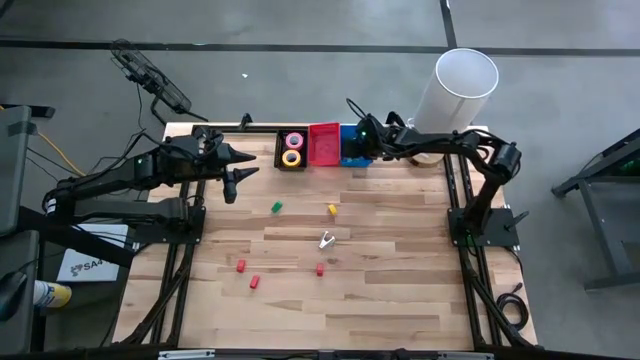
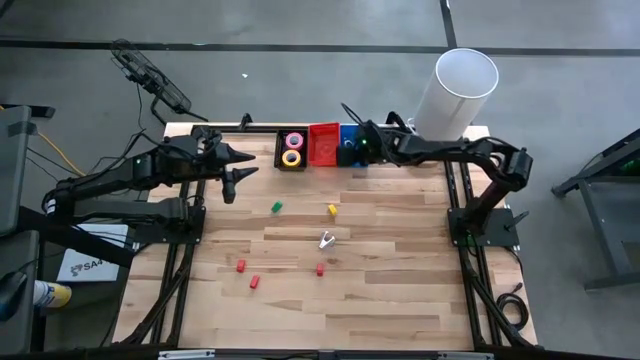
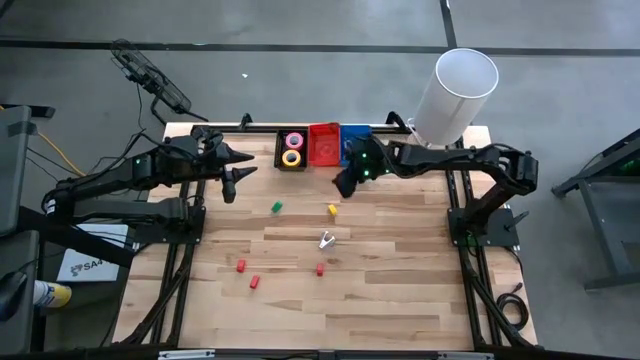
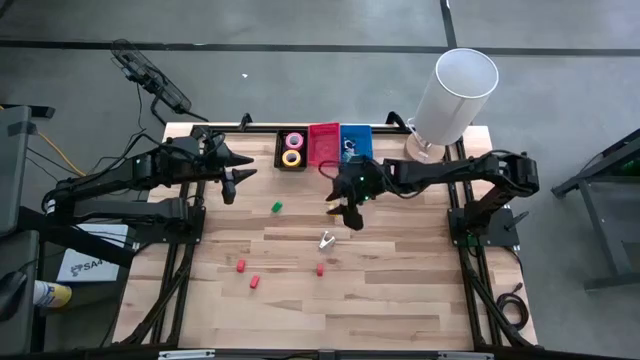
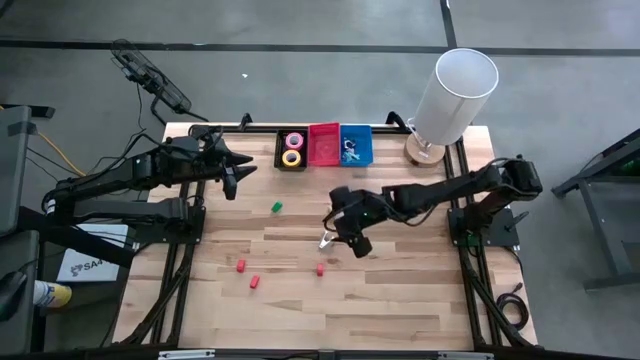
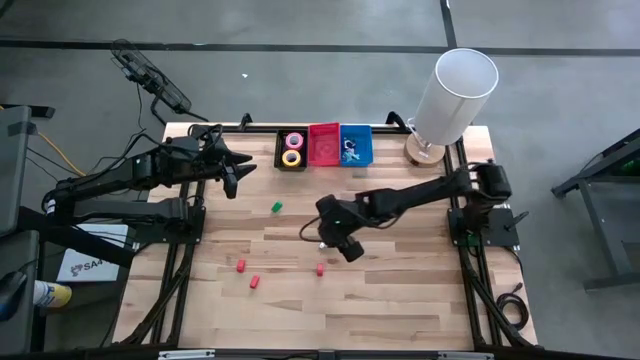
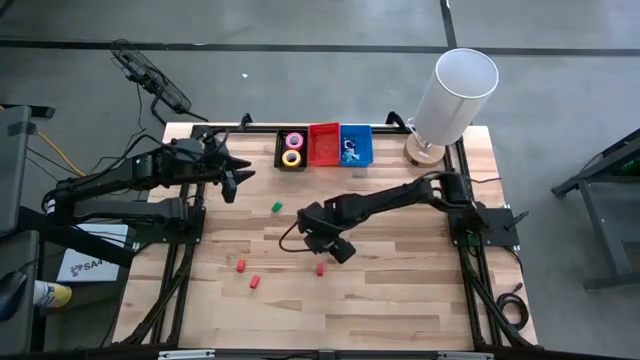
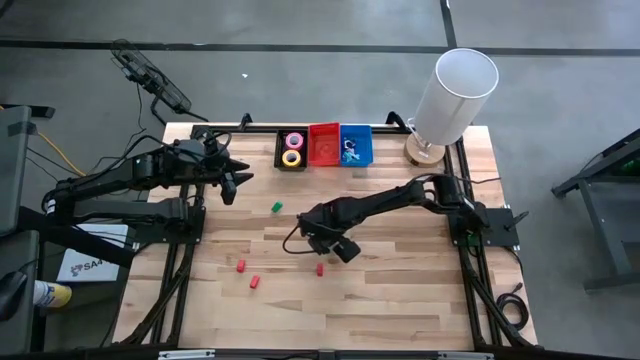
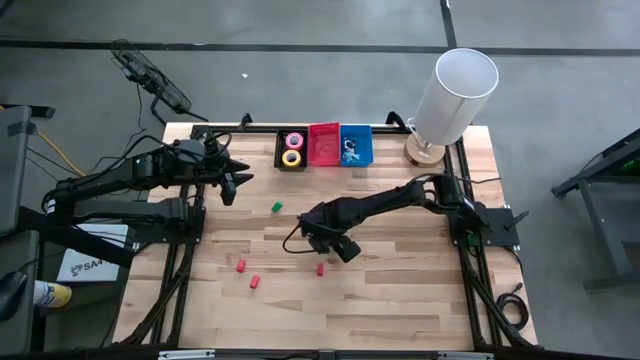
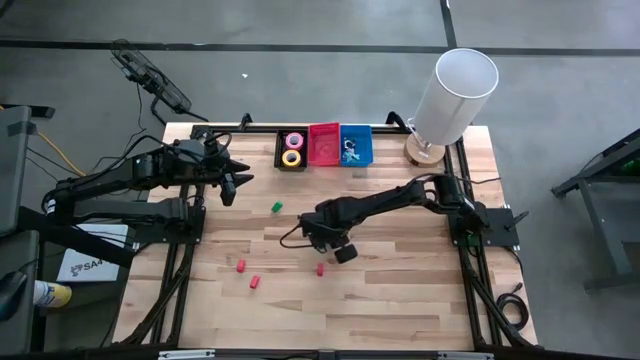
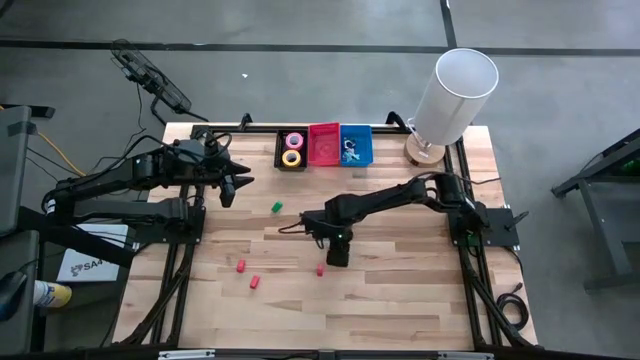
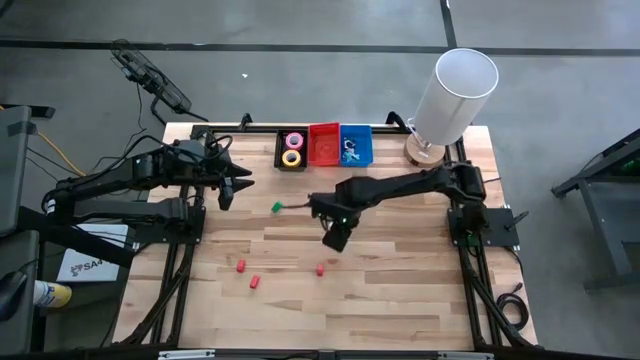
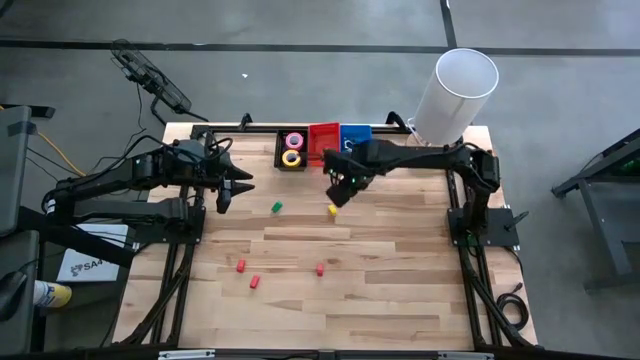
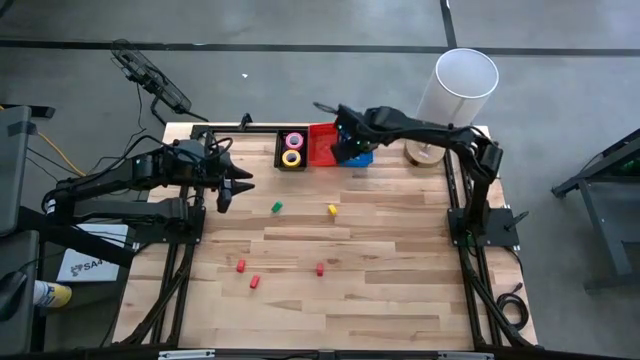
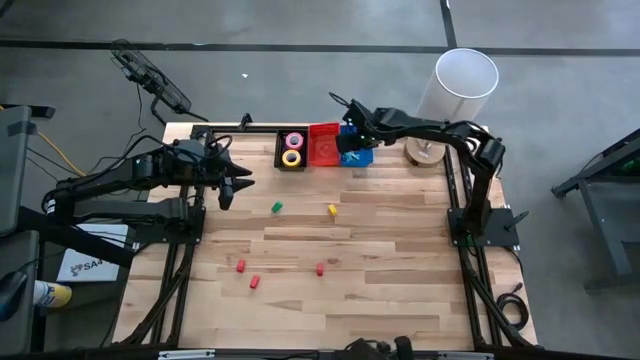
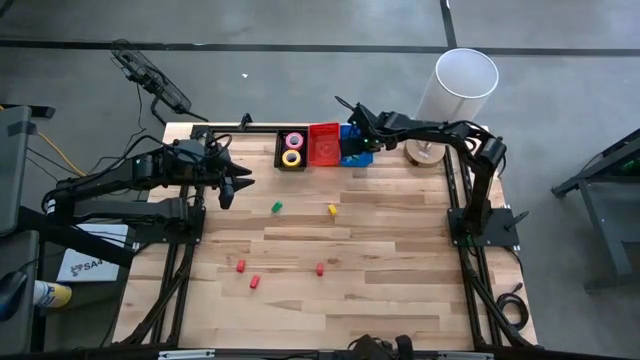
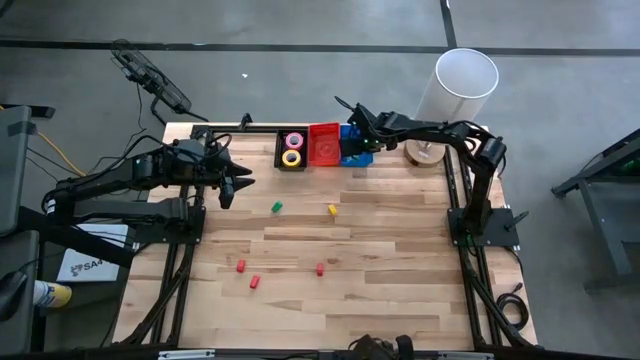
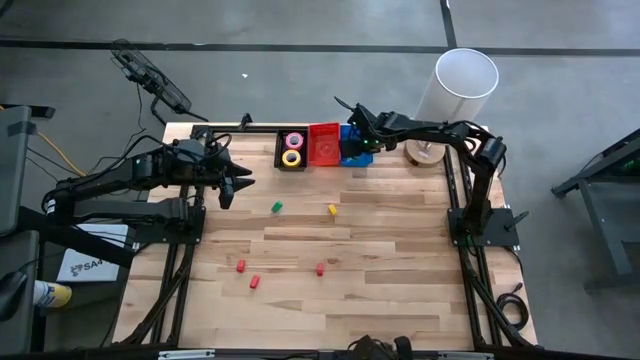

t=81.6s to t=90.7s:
Task: Pick and place Stapler, Stapler remover, tape
Put the gray staple remover into the blue bin

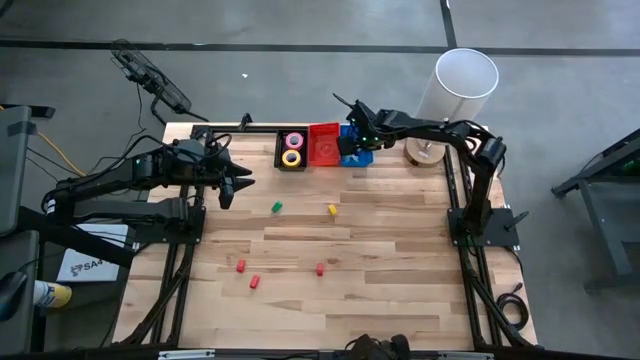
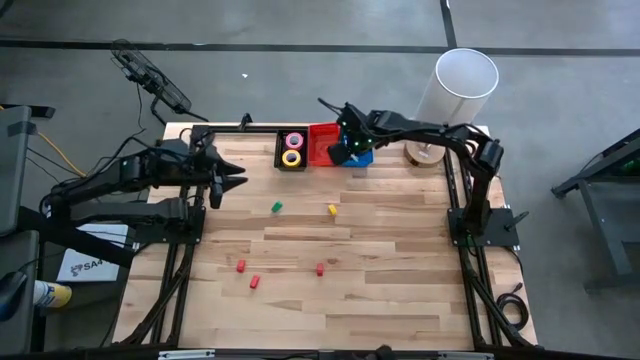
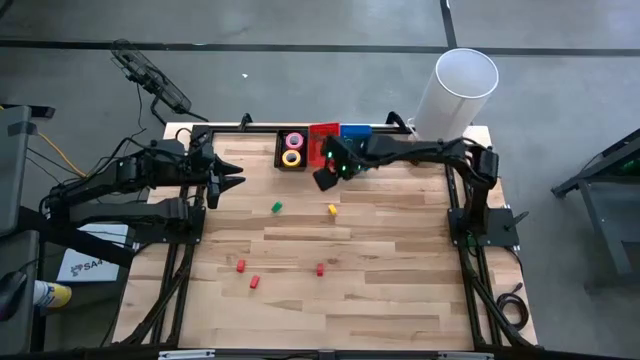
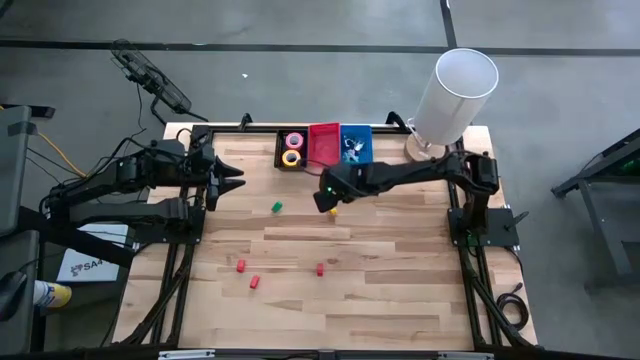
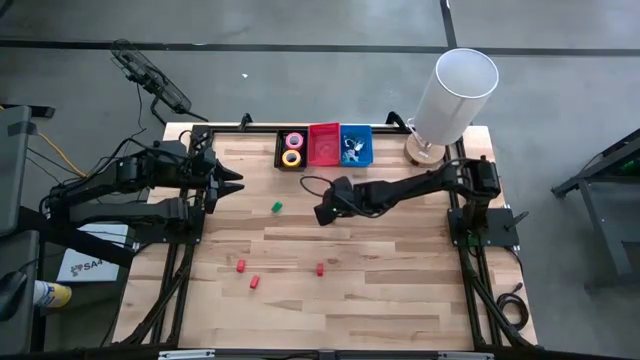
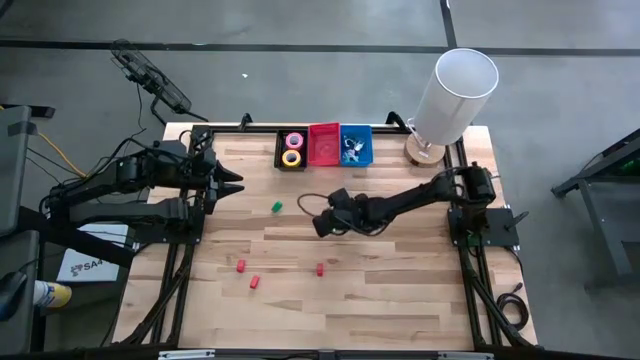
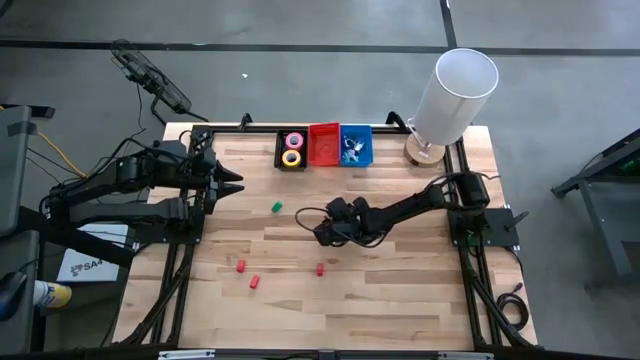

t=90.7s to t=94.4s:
Put the yellow stapler into the red bin

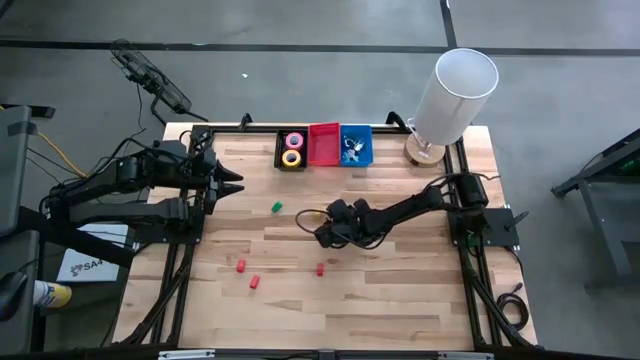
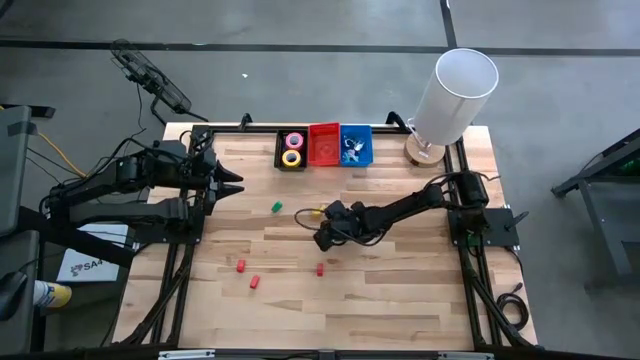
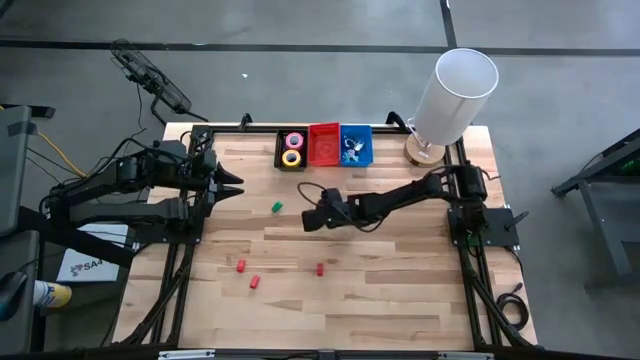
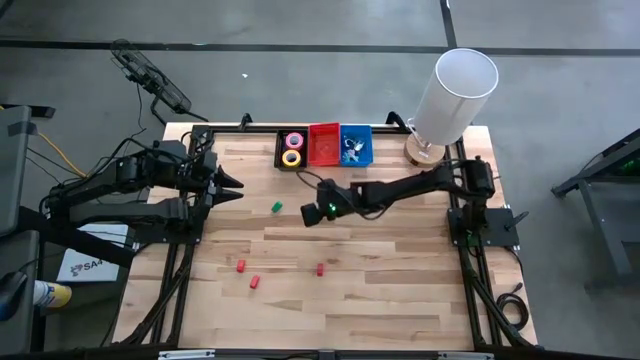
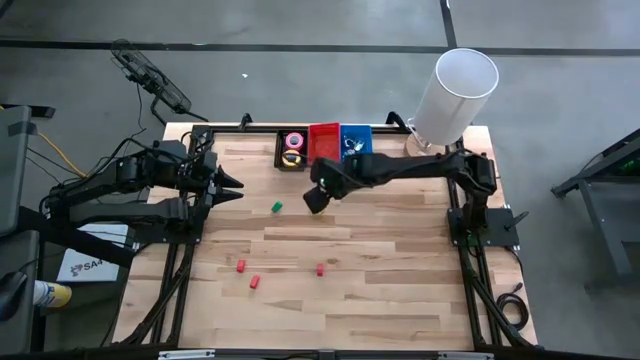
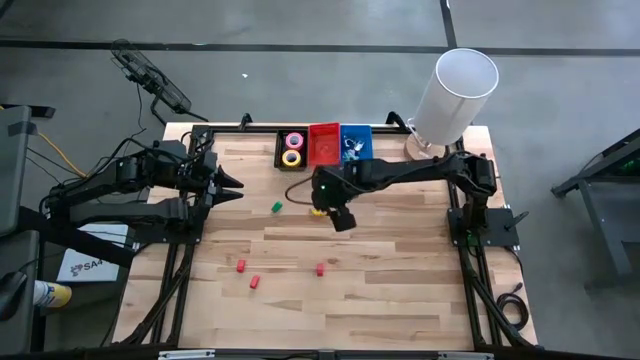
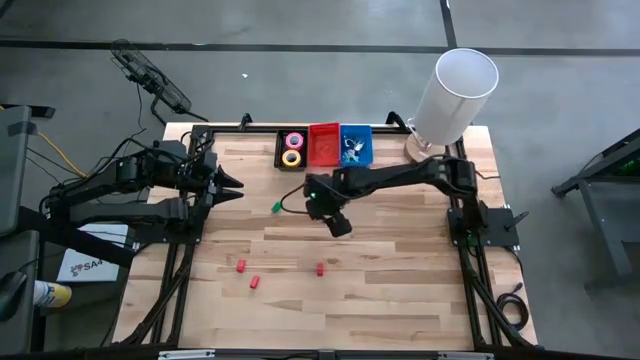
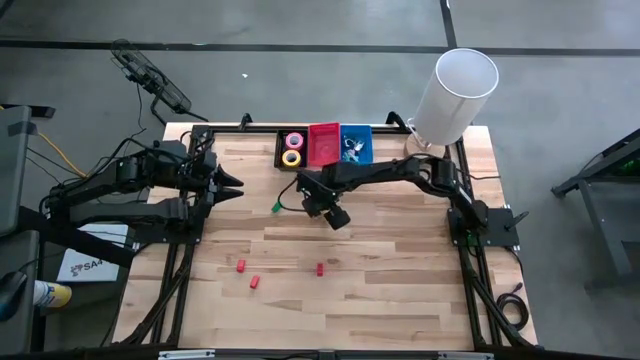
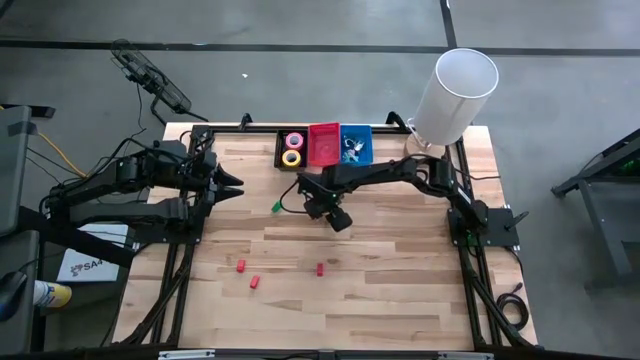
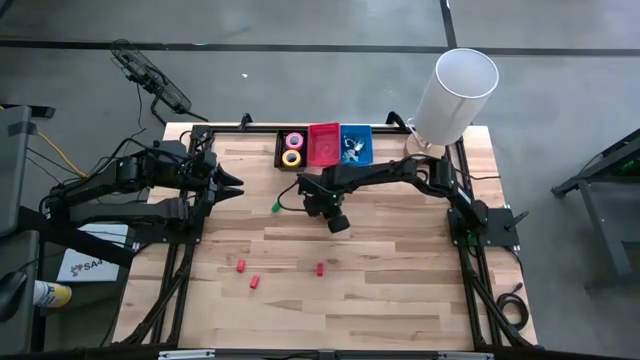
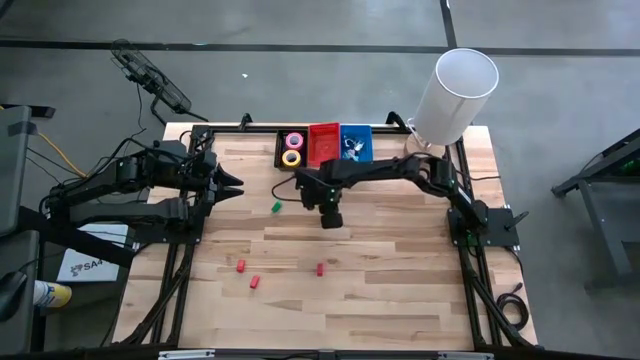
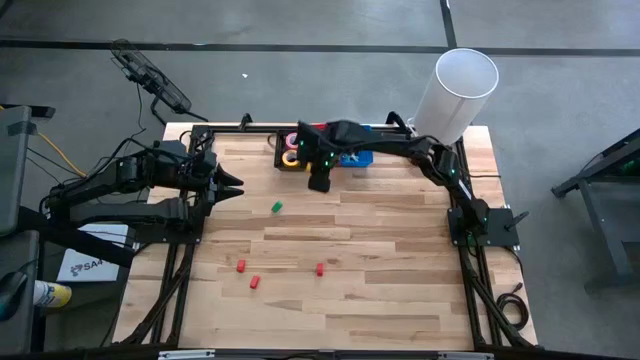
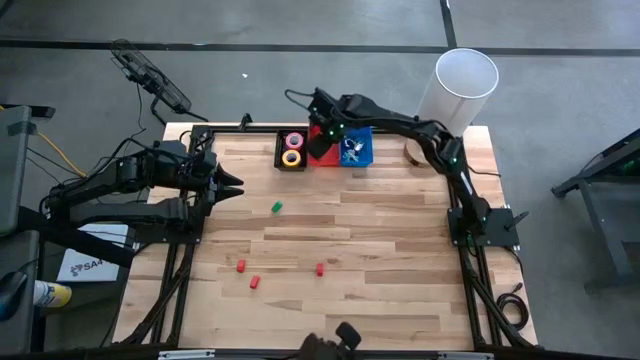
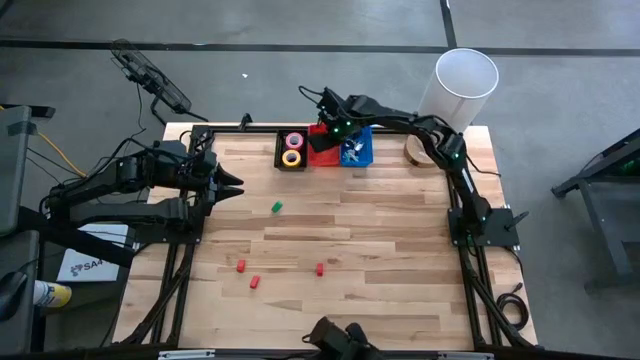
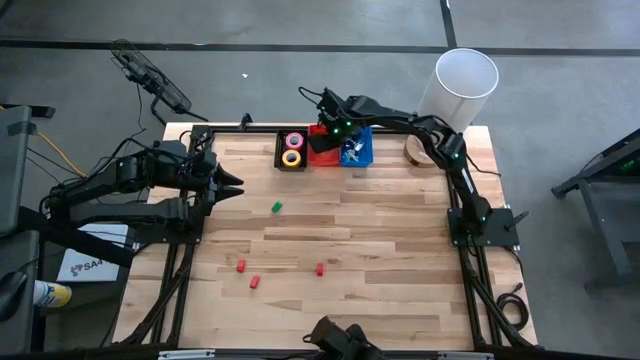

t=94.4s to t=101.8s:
Put the yellow stapler into the red bin

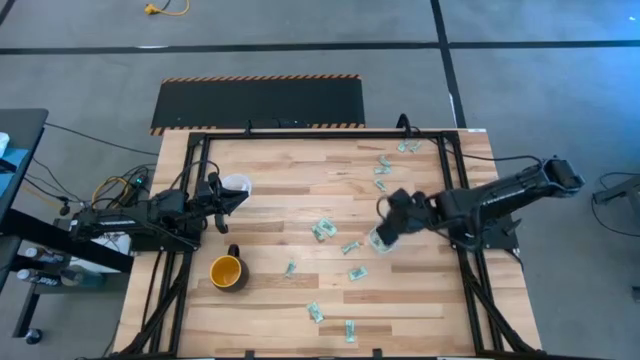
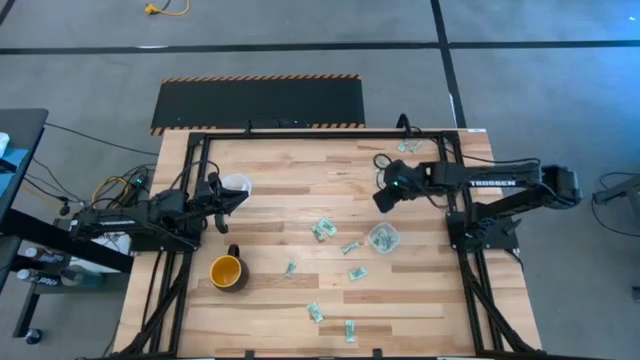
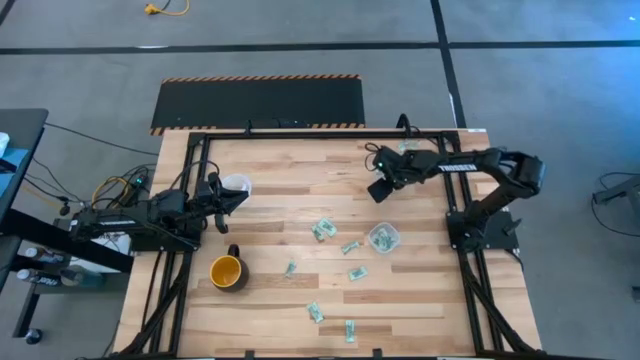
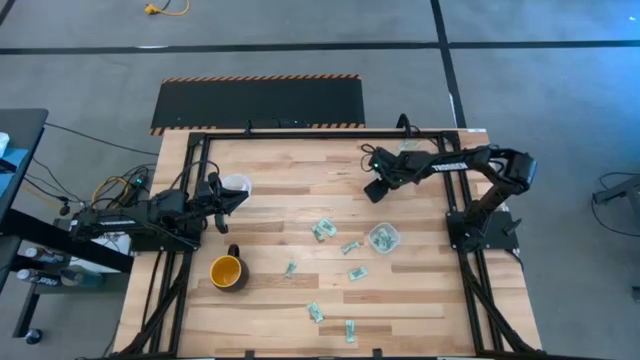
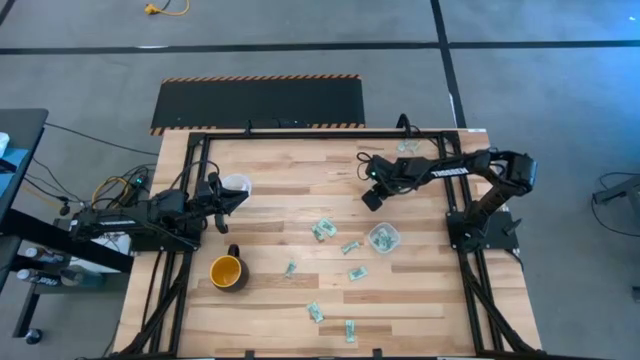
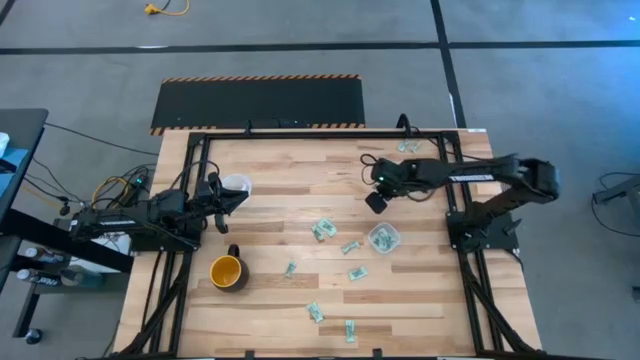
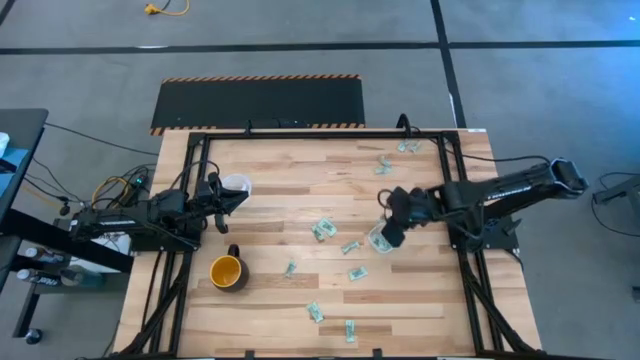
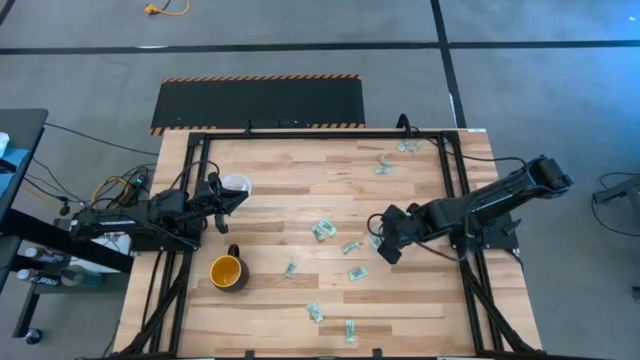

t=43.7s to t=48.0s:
Task: Pick and place Stevia / Truvia into bins
Put the white stevia packet into the square transparent container
